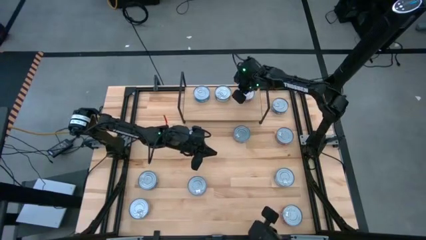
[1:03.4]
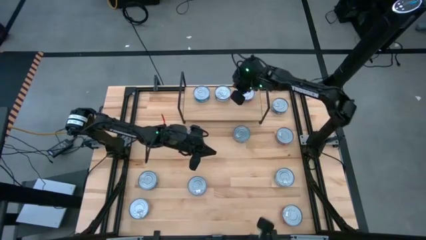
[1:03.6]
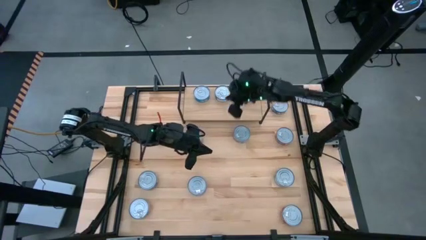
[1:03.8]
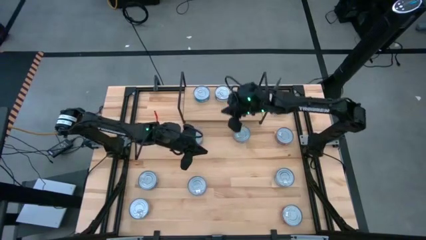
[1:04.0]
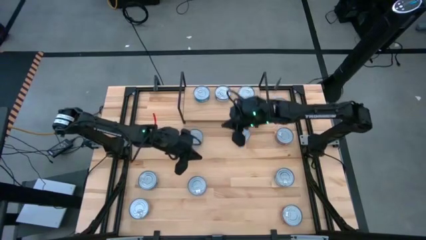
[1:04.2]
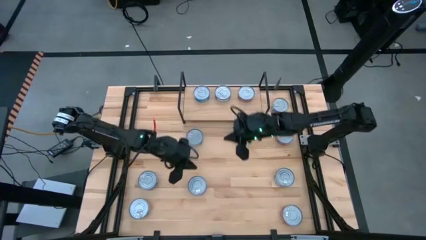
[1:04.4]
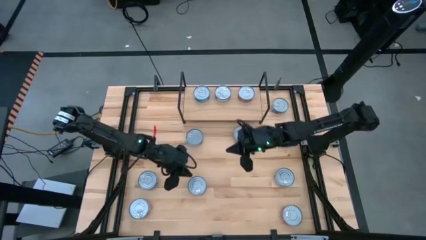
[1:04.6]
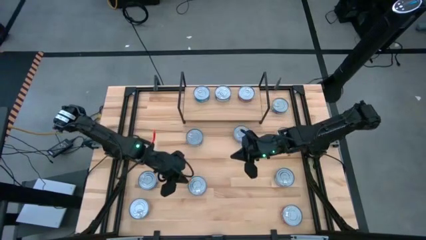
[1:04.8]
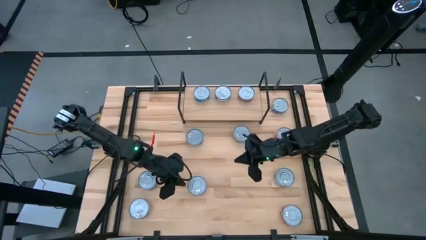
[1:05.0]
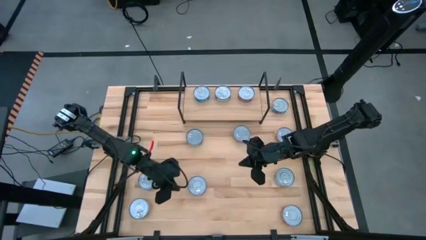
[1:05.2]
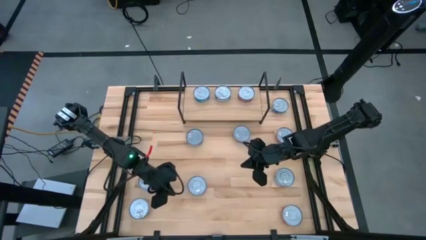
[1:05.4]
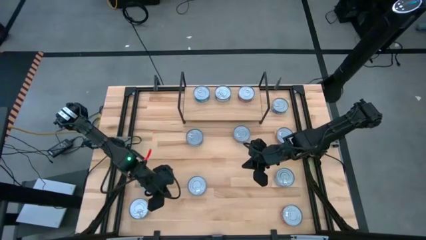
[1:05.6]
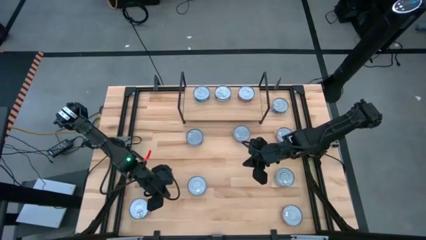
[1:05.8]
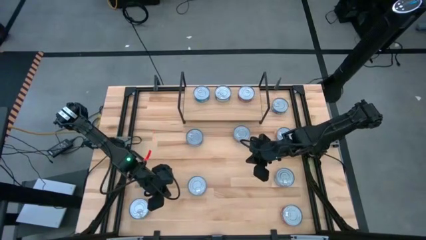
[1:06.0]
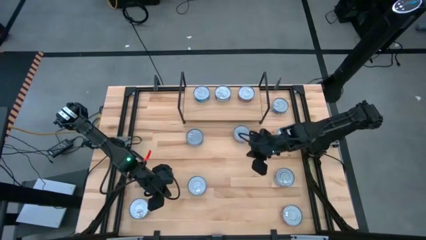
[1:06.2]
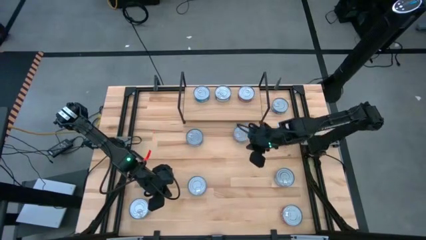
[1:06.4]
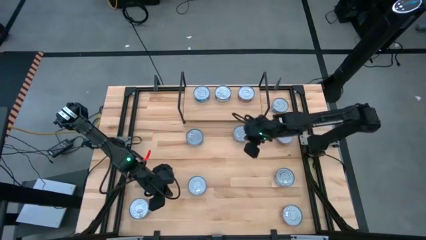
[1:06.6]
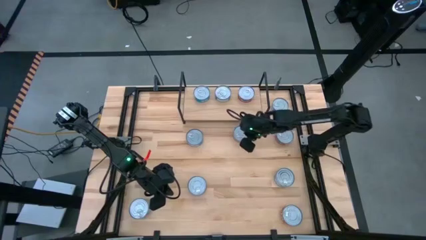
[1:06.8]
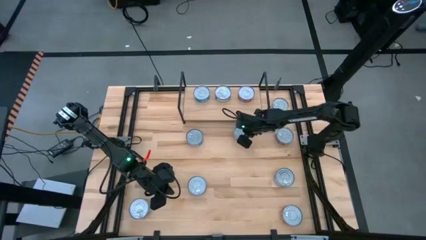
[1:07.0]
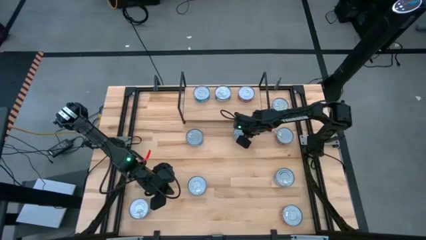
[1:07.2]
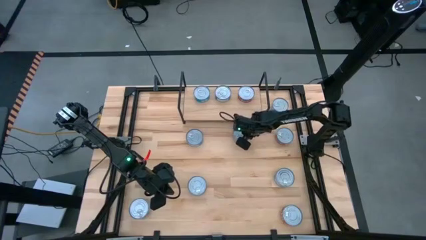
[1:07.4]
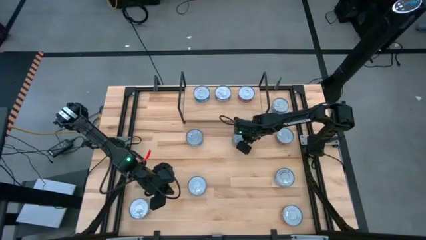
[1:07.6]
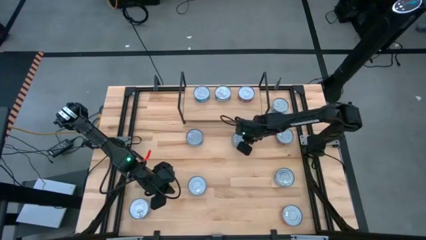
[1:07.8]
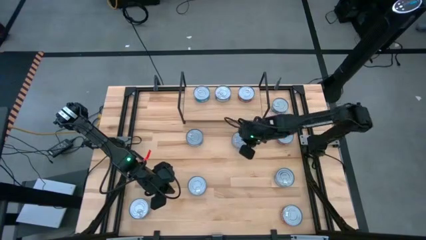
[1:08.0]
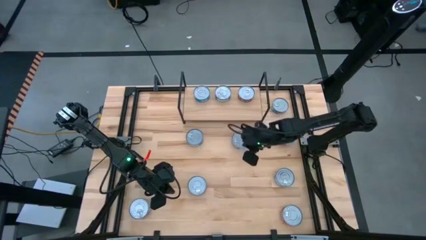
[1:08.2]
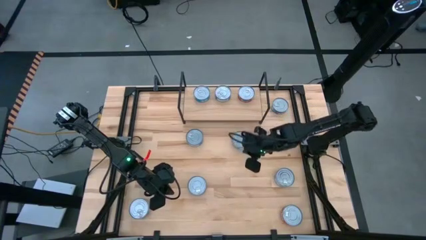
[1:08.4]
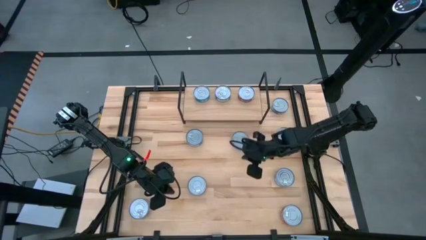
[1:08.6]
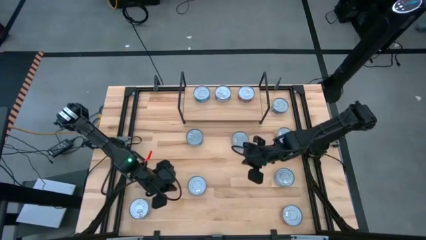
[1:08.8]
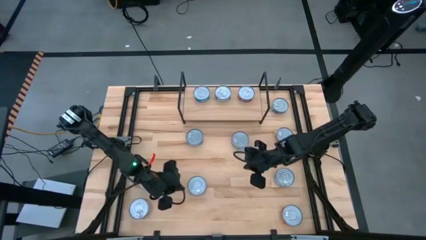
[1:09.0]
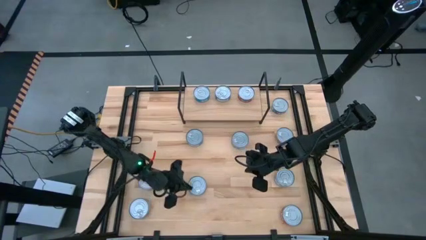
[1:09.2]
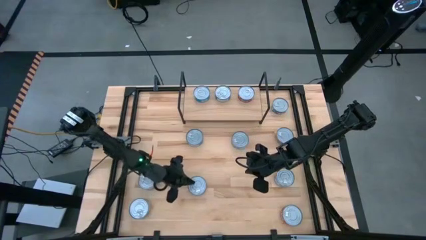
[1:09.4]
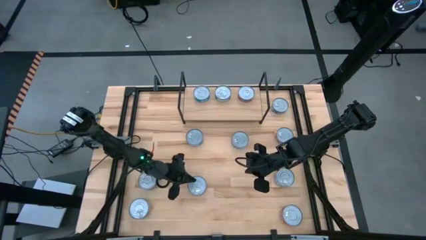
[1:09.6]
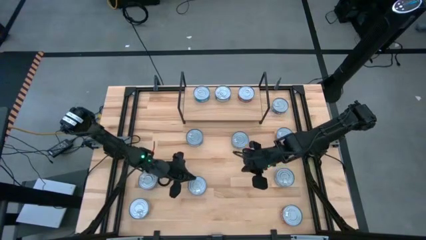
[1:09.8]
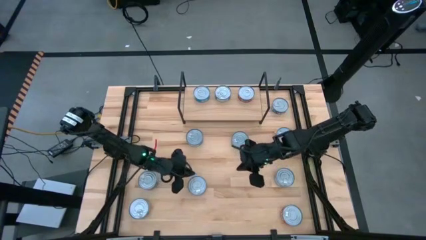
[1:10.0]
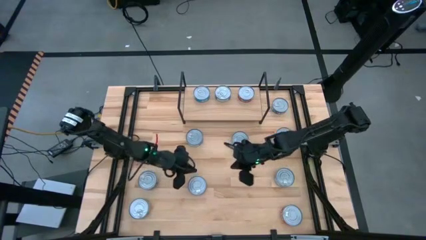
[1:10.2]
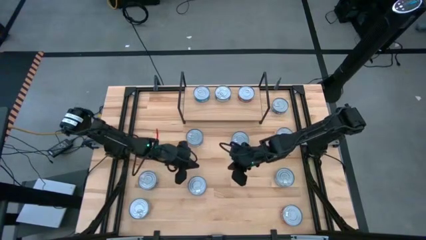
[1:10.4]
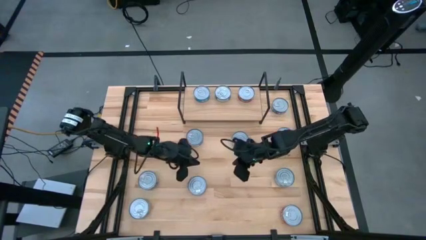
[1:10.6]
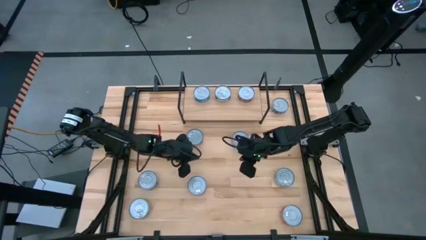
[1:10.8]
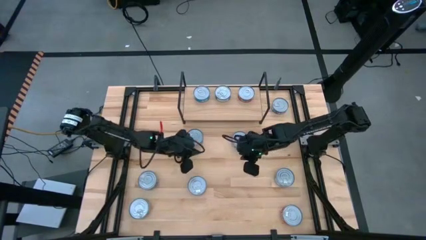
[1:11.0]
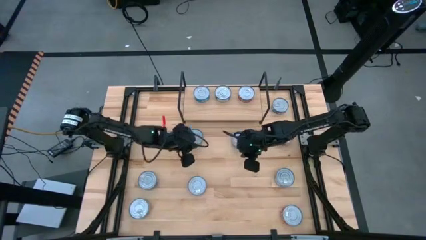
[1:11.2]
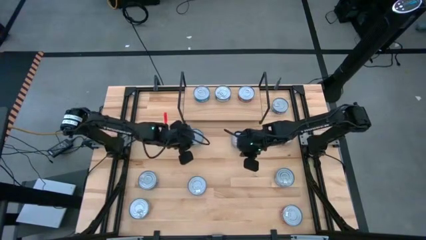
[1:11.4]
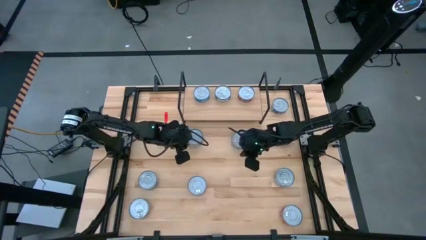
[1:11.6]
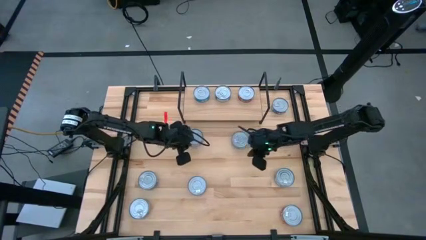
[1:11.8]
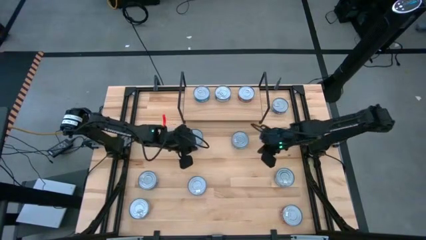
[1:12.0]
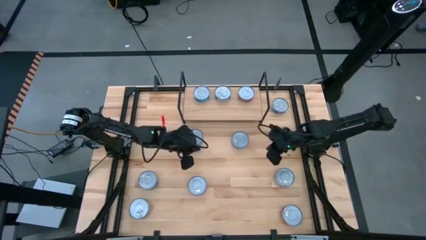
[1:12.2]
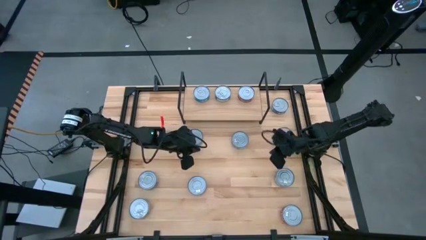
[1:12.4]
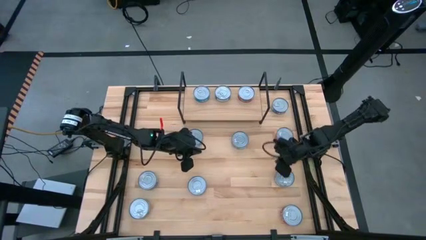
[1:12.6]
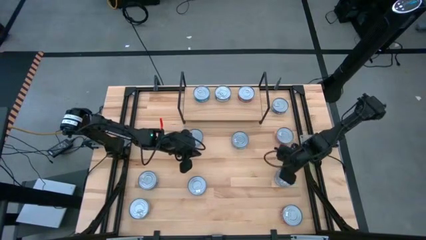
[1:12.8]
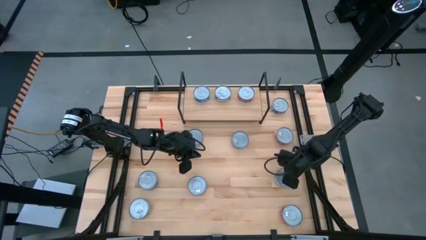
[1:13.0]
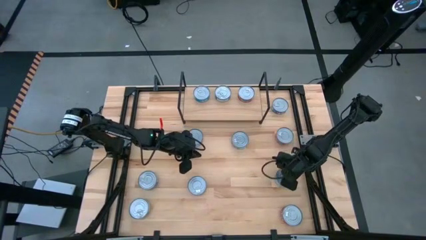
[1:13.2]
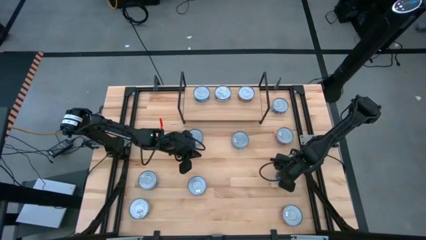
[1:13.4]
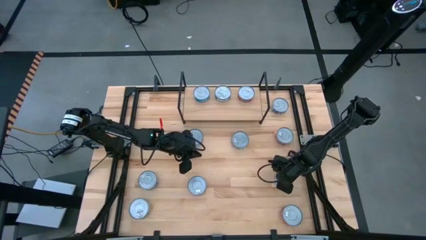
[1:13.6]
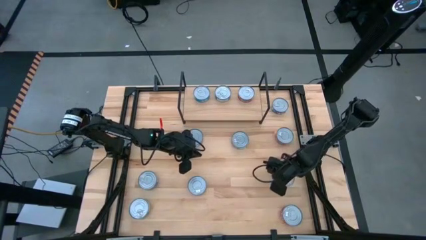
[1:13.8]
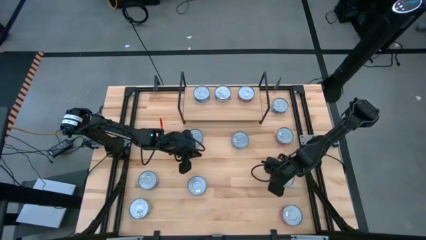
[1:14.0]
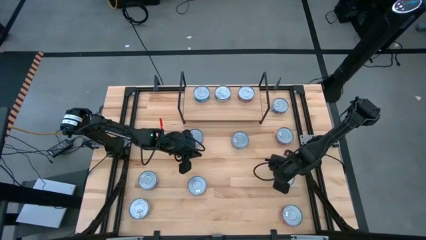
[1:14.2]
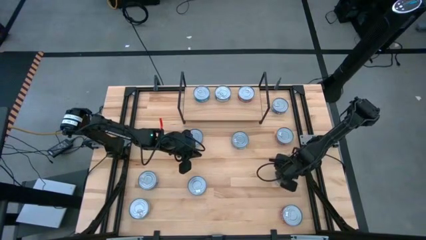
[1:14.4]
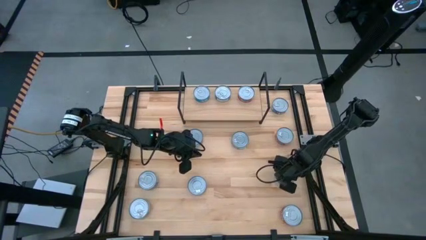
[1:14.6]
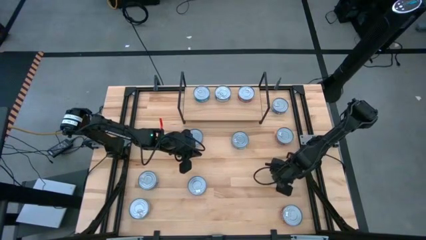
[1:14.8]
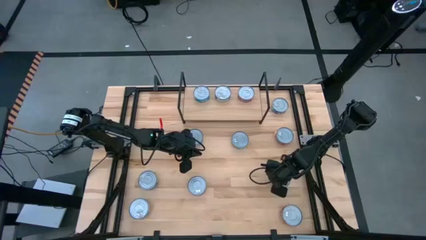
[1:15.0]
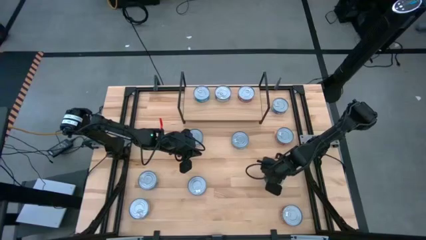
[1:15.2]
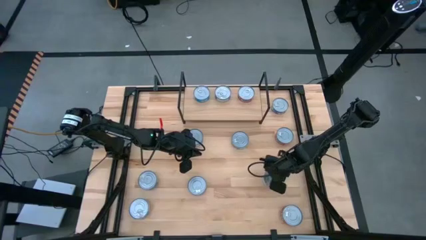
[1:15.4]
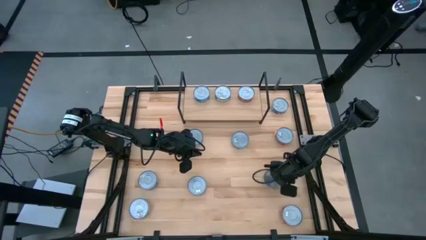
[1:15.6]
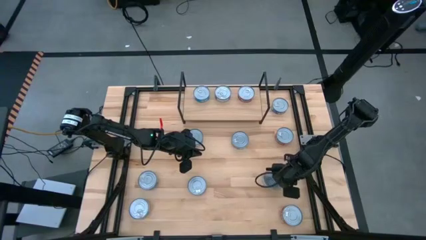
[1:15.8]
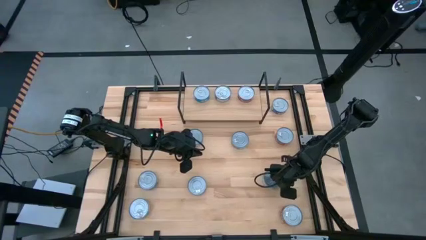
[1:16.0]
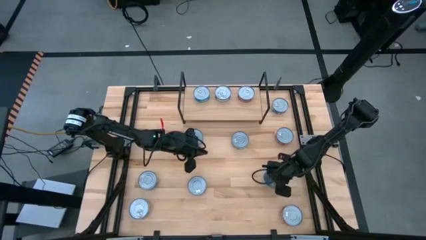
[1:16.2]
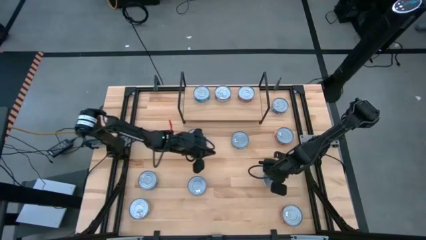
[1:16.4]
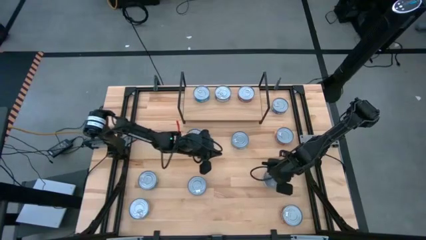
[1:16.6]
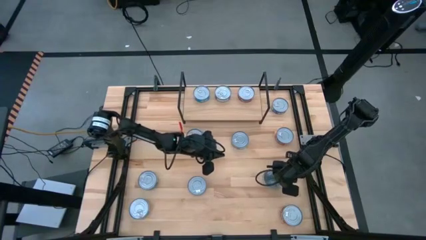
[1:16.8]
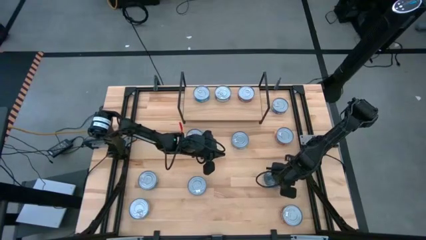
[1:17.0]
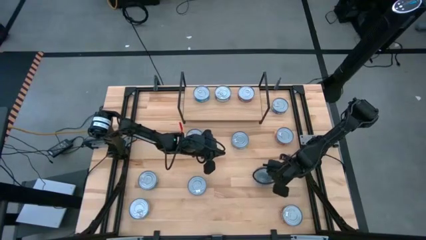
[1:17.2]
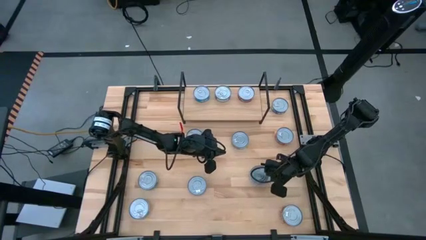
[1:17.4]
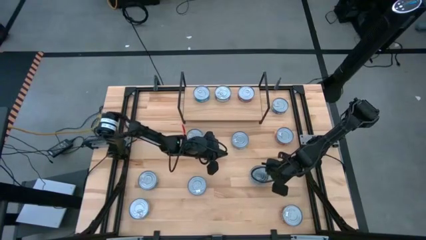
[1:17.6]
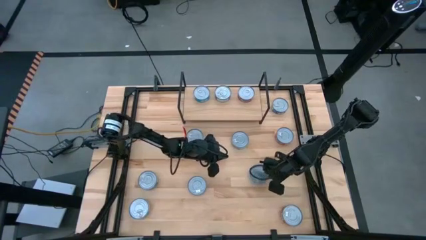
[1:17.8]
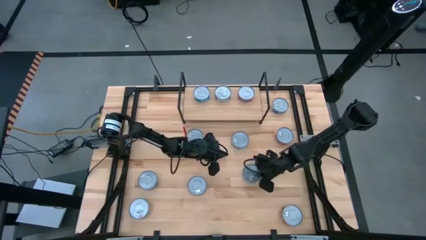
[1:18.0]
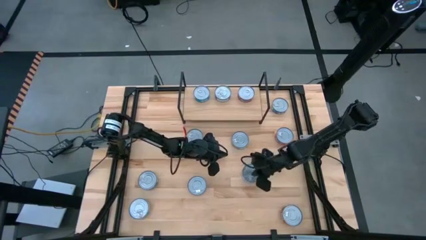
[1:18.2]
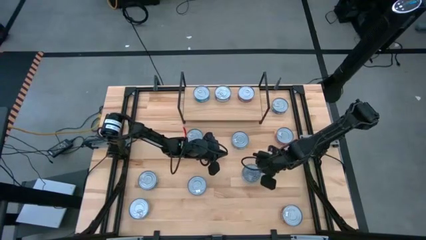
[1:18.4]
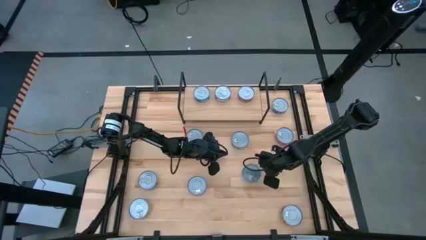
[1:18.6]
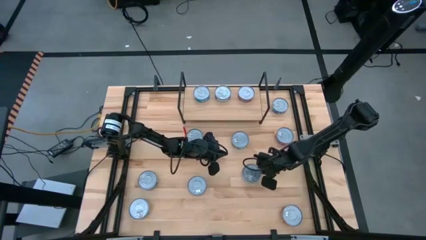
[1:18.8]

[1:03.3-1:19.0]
Task: Stack canned seafood by type on shelf
Put the yellow-blue tuna can on the shelf
